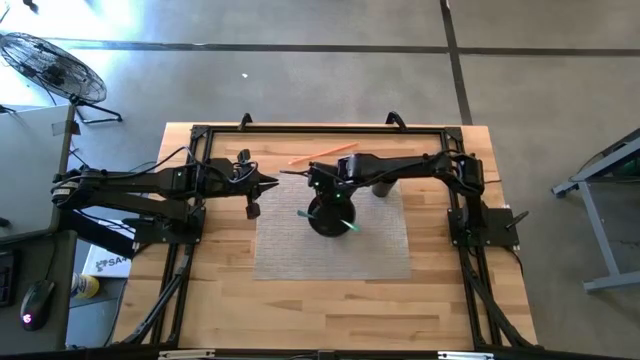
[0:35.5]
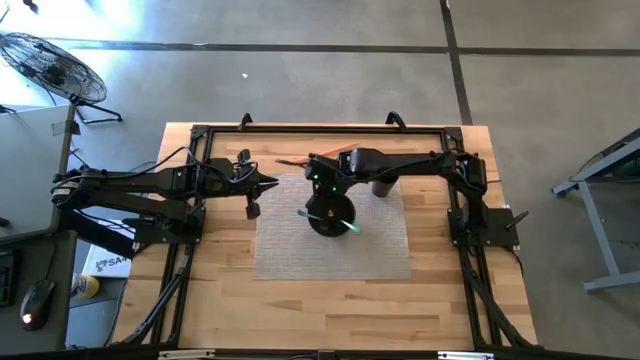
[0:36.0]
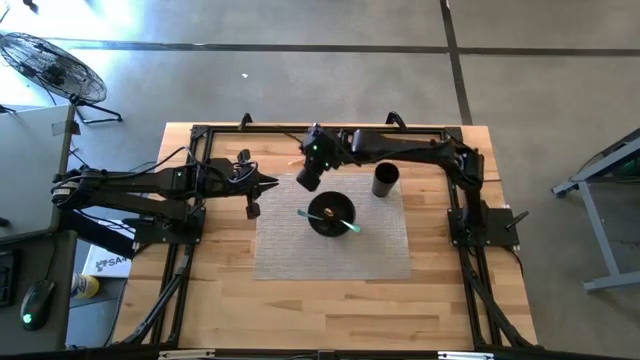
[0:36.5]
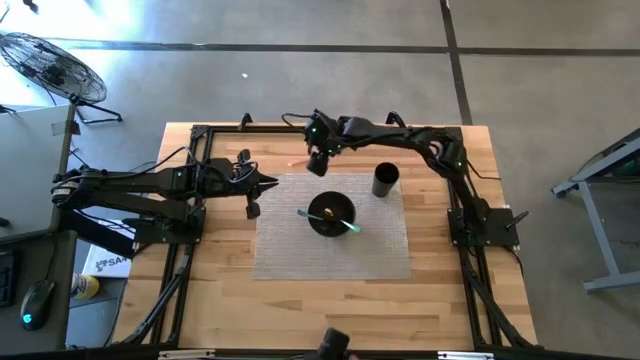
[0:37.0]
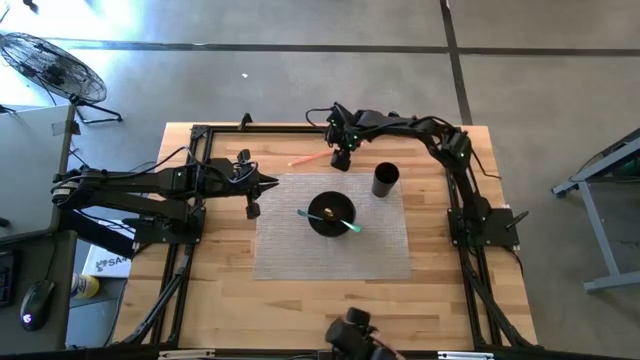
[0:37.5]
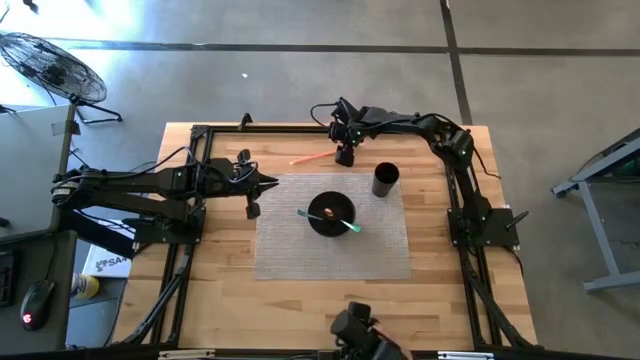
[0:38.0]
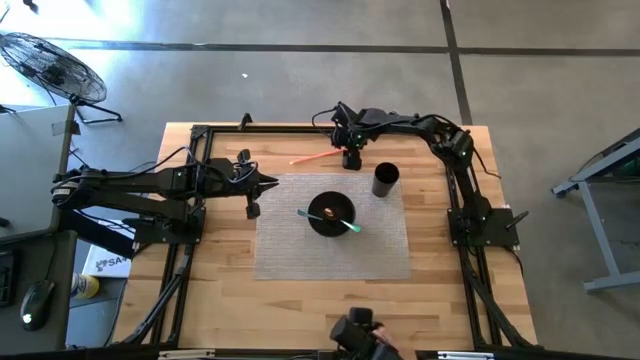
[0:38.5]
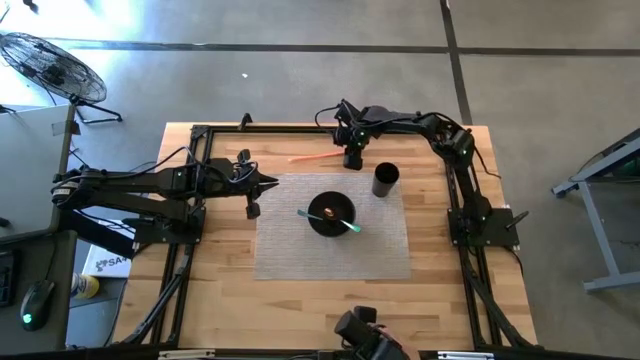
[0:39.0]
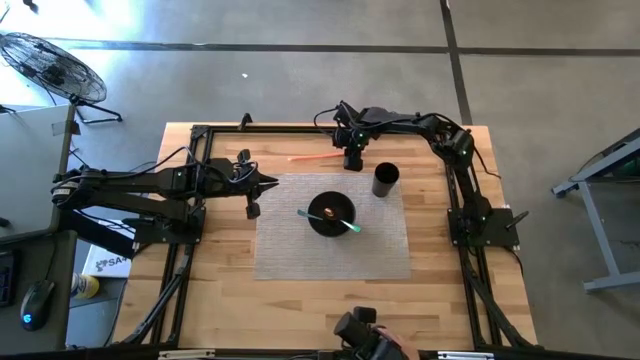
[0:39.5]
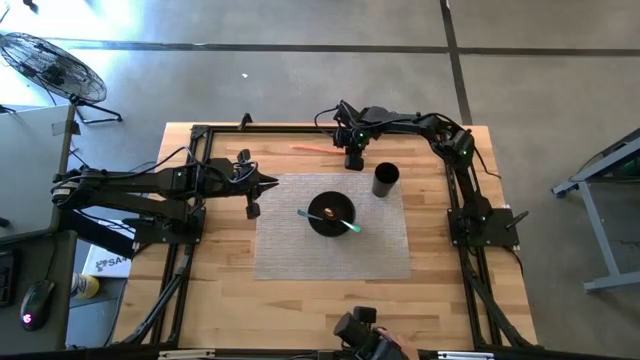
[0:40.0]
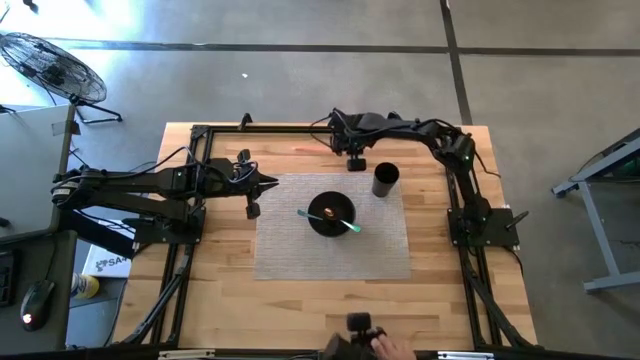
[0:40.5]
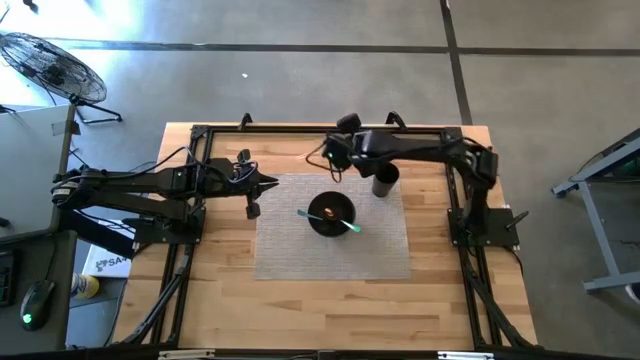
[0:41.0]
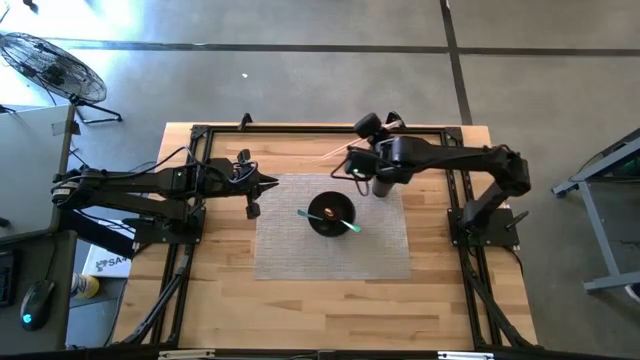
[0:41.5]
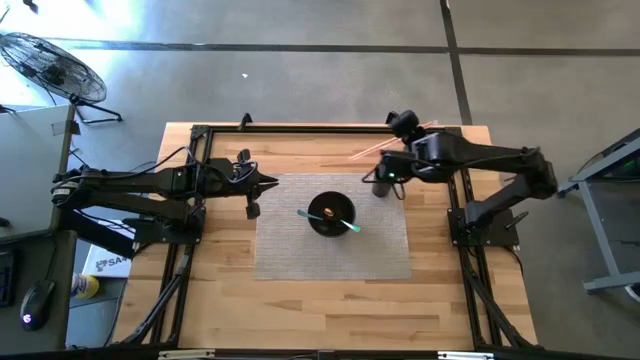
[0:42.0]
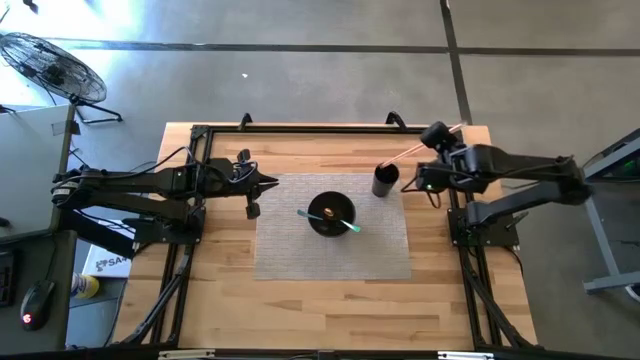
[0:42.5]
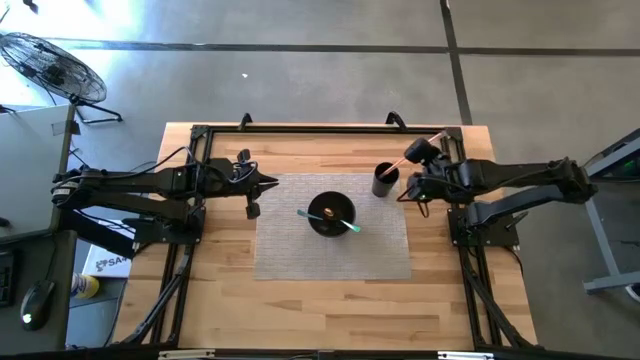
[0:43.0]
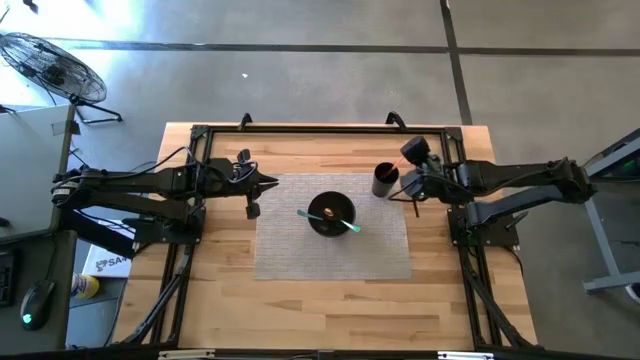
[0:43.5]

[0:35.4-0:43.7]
Task: Pick & Place Utensil
Put the orange straw into the black cup

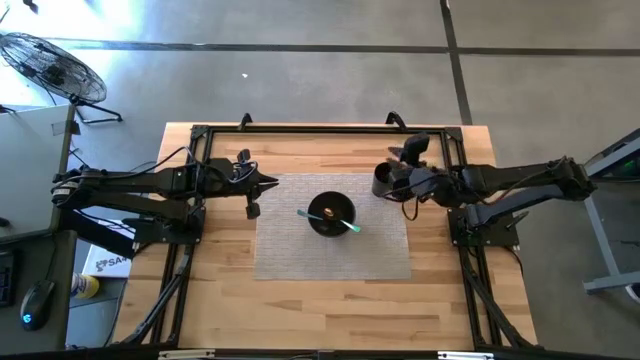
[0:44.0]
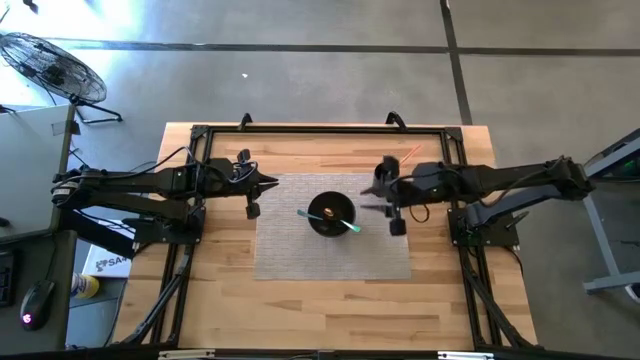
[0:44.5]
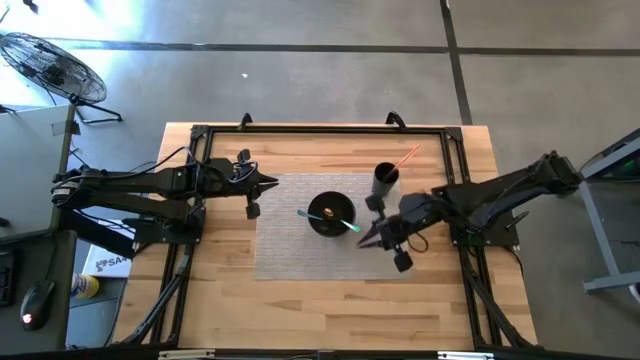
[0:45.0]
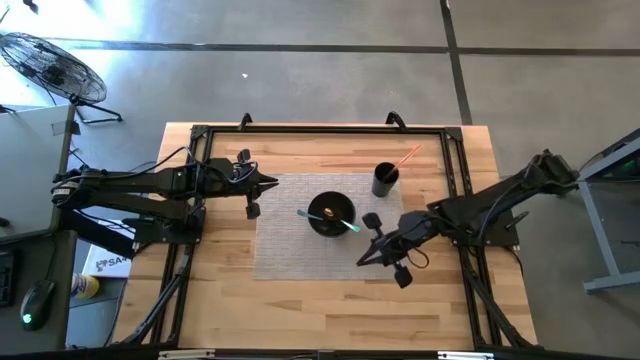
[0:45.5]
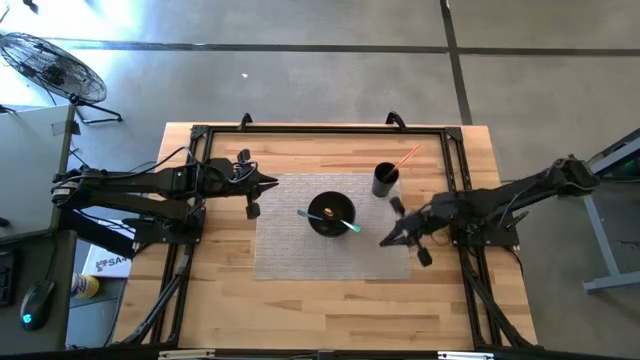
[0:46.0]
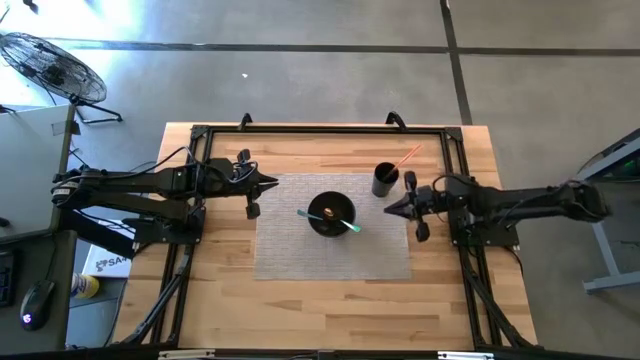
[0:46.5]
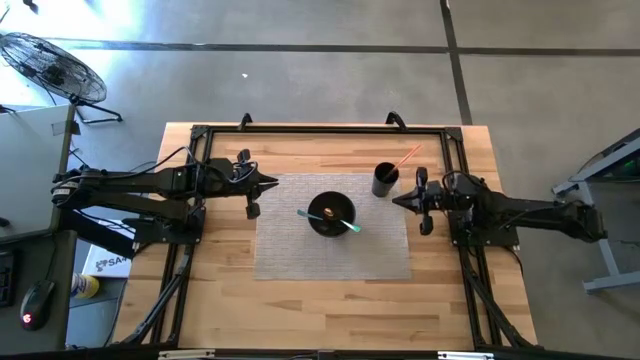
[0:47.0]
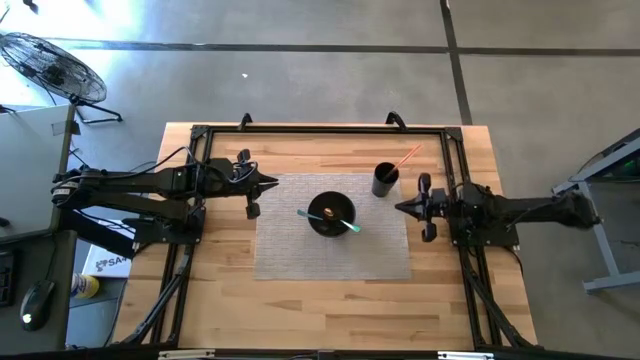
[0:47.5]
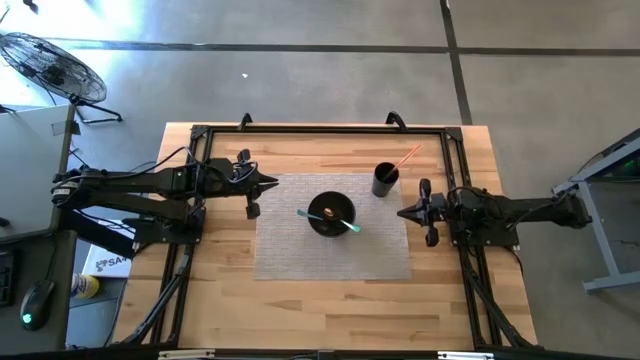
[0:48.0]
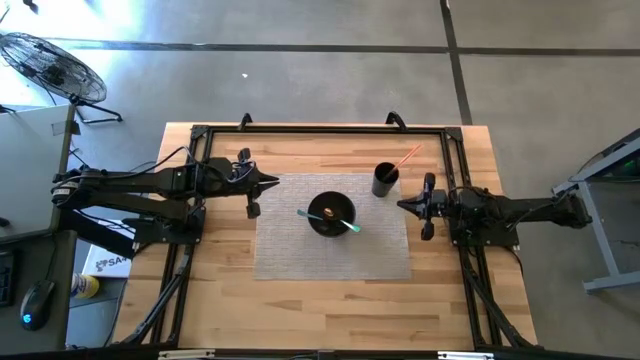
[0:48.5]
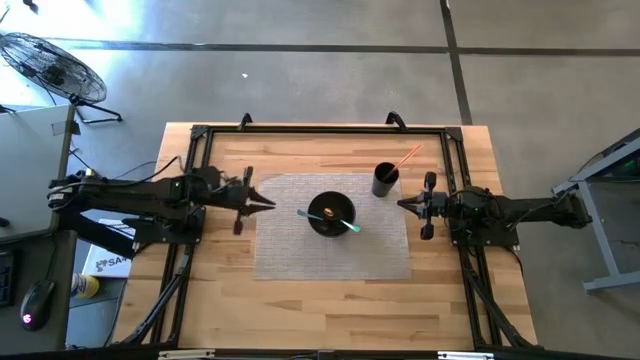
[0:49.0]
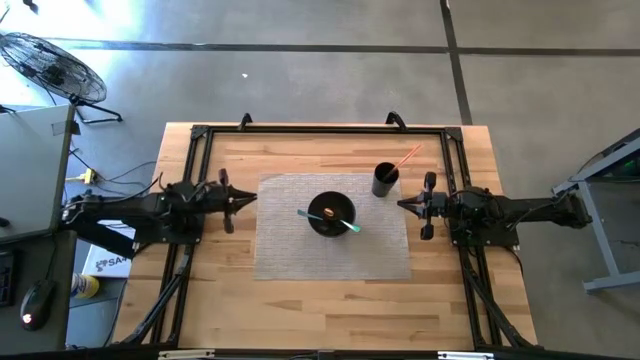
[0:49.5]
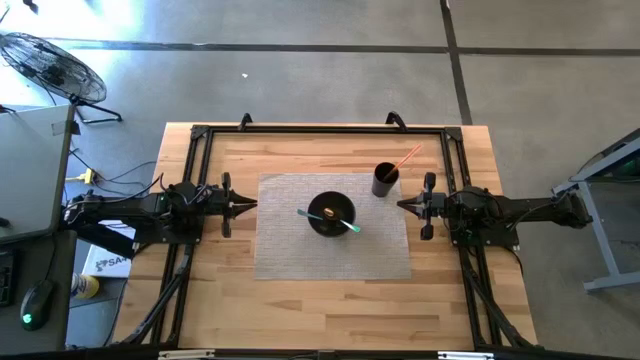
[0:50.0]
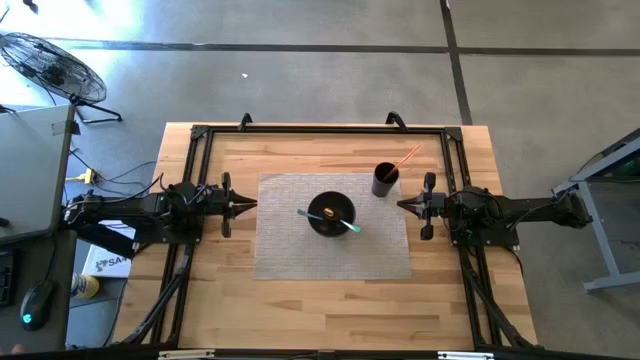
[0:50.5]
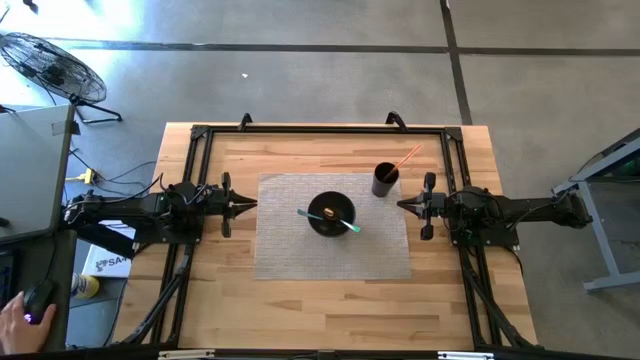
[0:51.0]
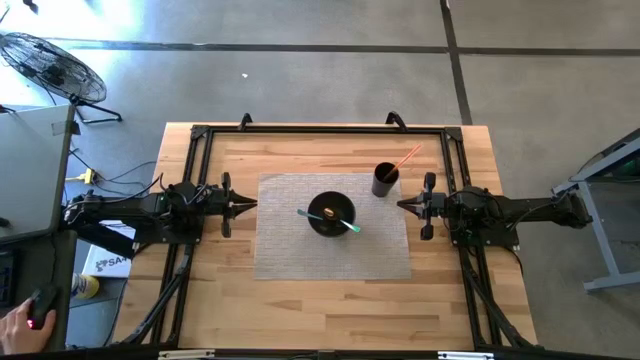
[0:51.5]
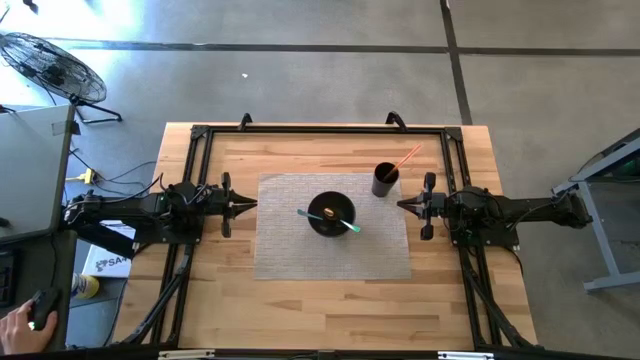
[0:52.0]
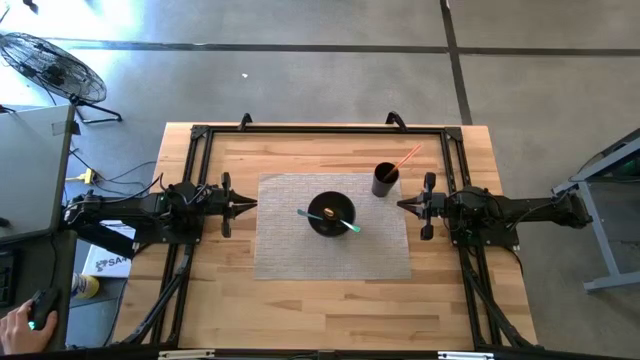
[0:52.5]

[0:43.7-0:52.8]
Return to Home Position

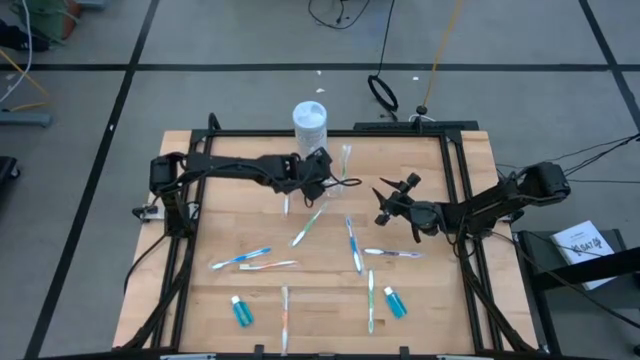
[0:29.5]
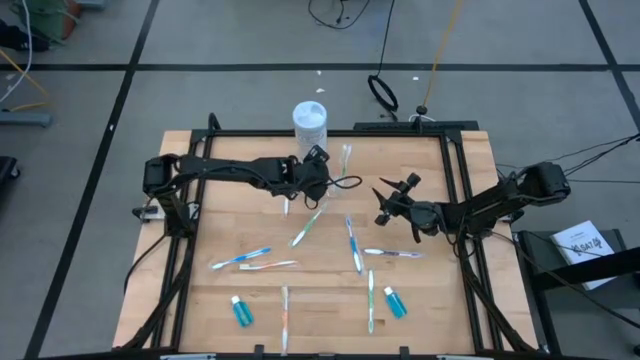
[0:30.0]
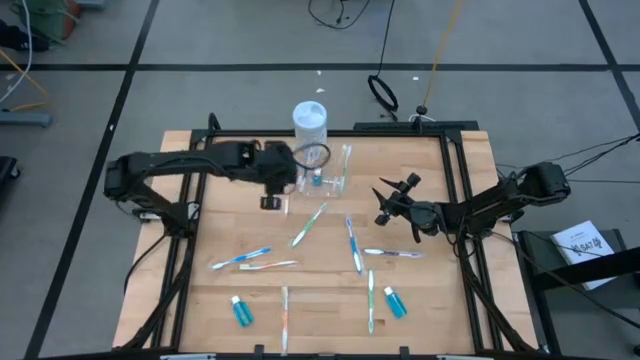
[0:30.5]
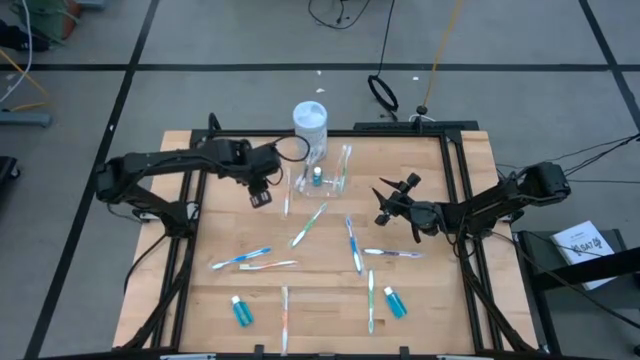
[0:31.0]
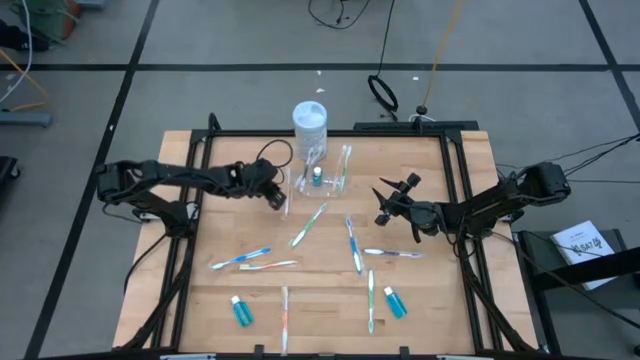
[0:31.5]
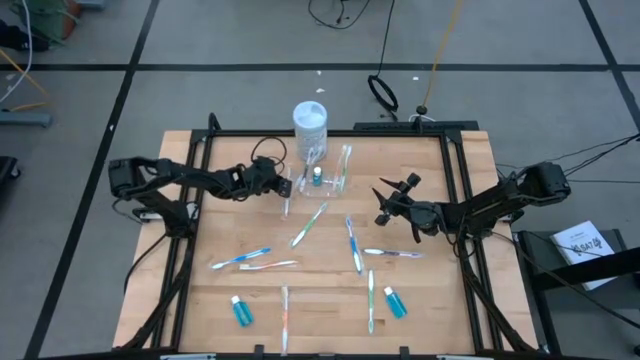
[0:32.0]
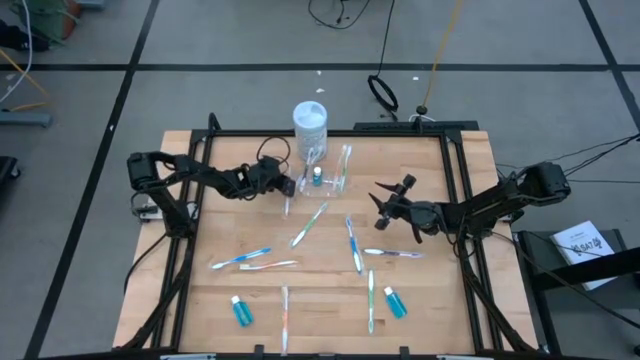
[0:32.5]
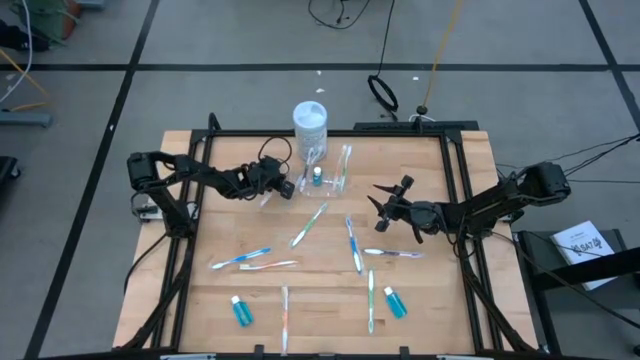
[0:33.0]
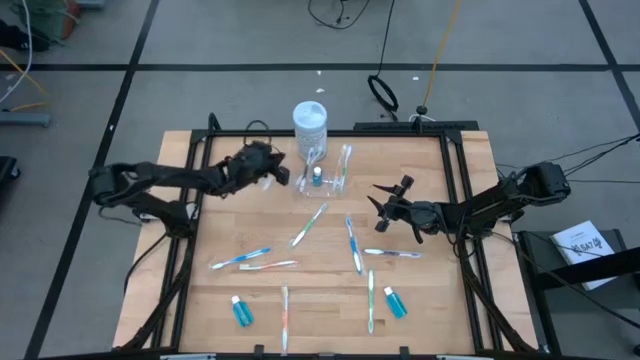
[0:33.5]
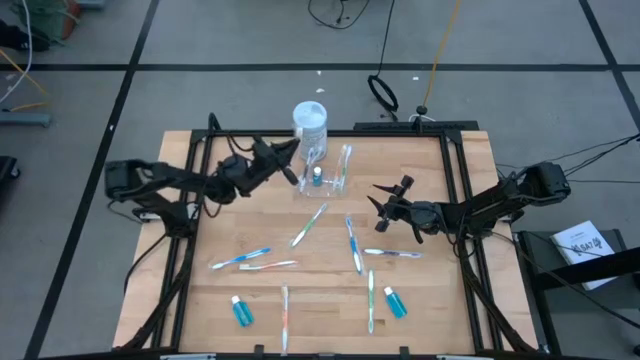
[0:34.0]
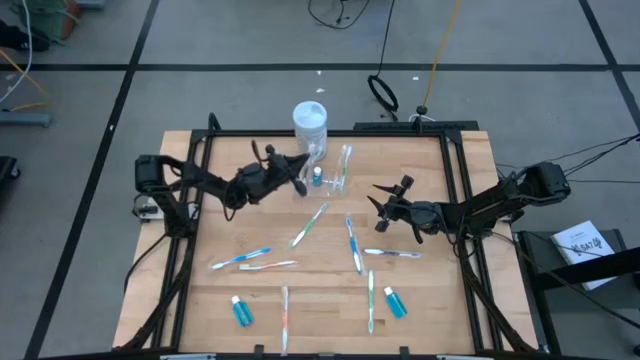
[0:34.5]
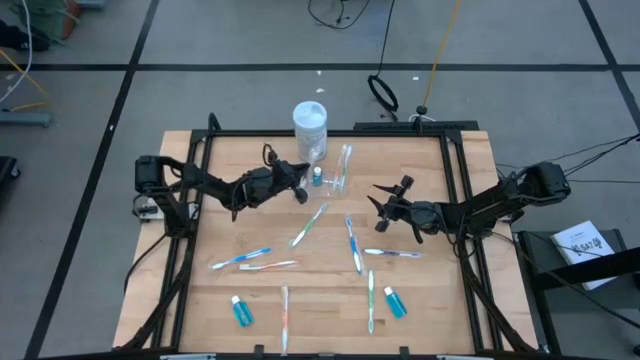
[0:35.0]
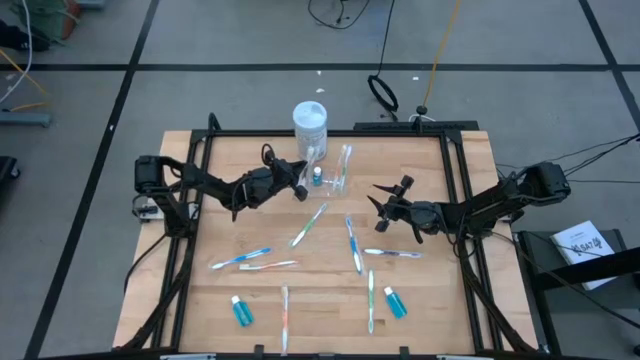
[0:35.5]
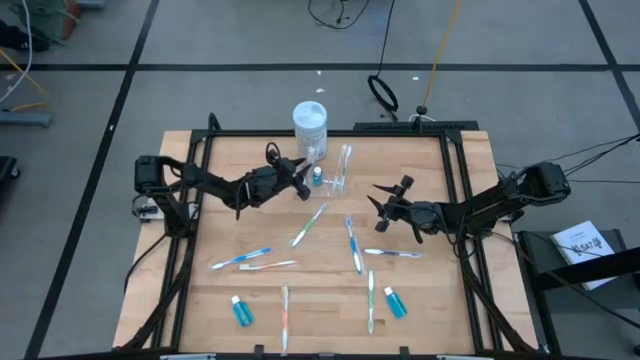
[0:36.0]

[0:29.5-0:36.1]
Task: Pick & Place toothbrushing station
Put the orange toothbrush into the transparent organizer
